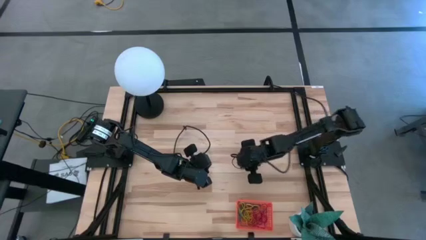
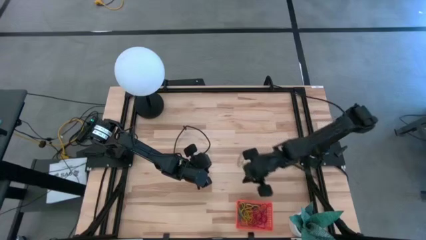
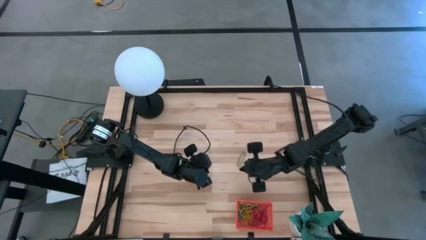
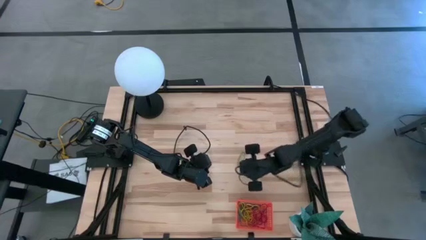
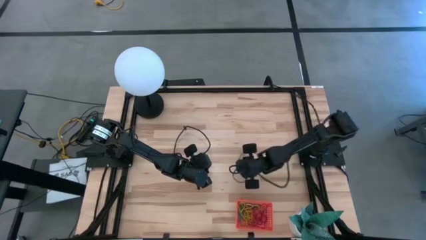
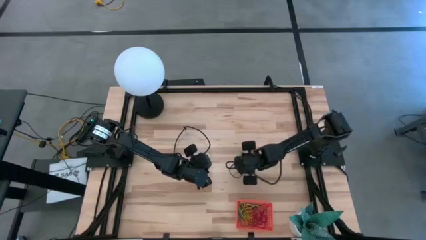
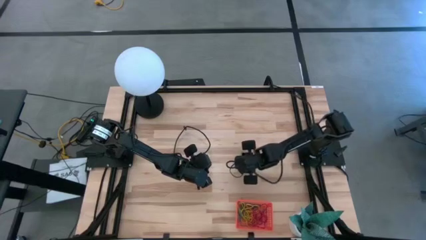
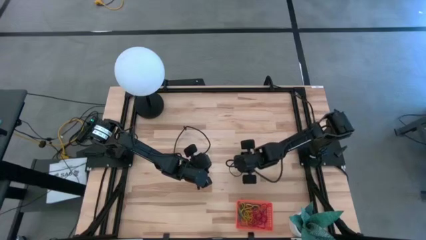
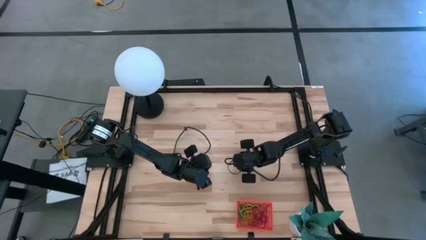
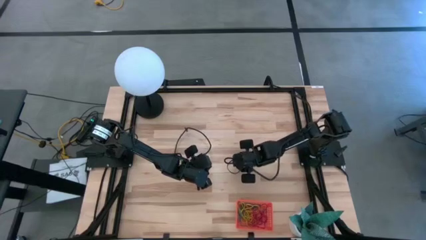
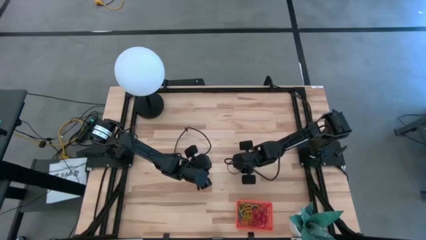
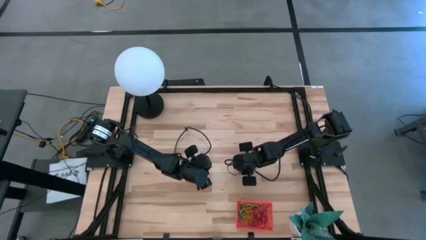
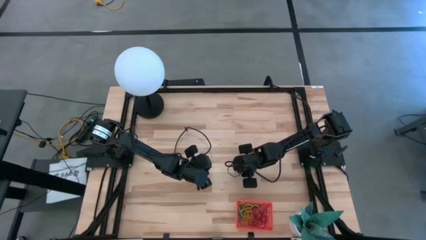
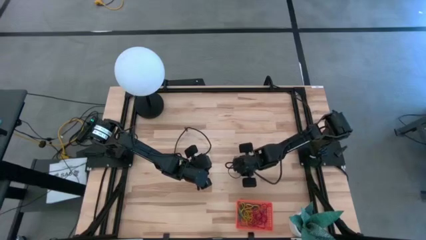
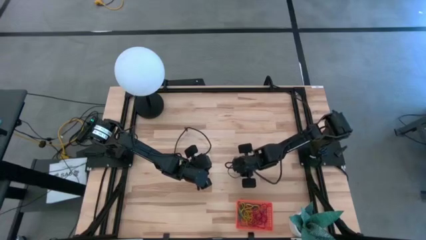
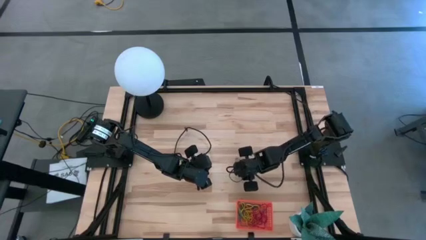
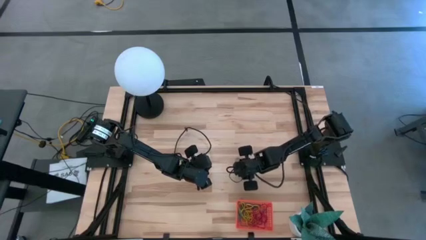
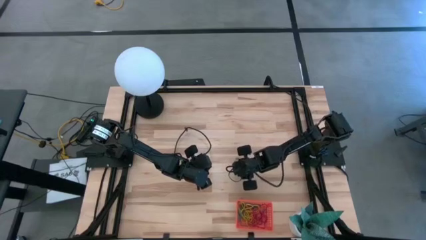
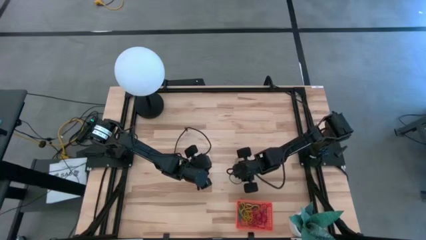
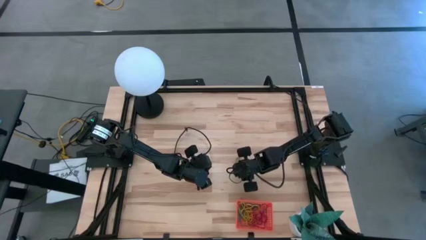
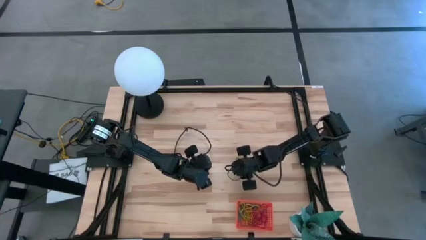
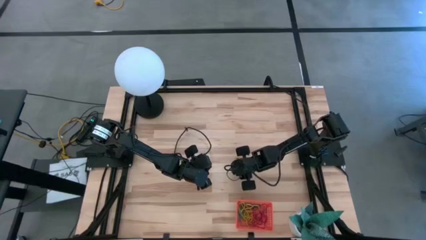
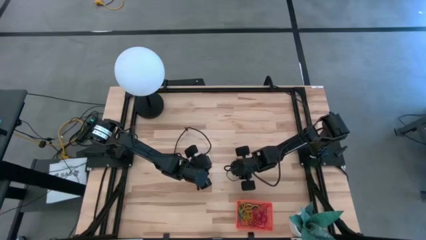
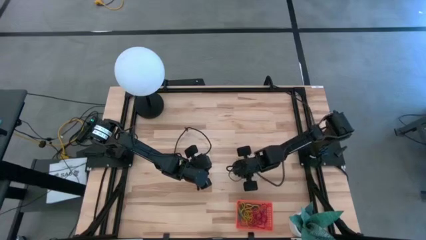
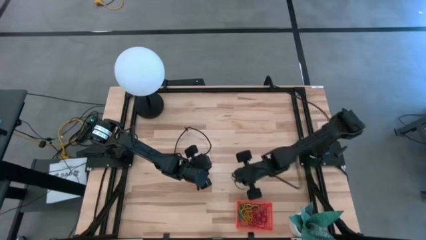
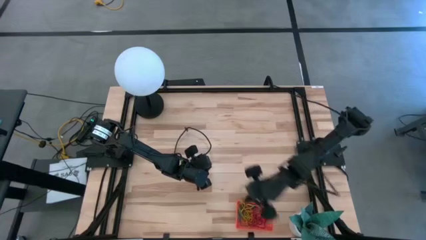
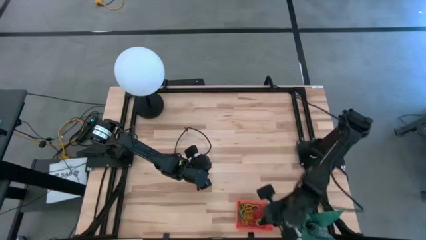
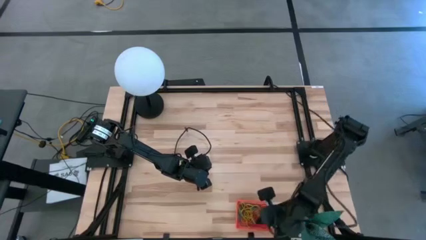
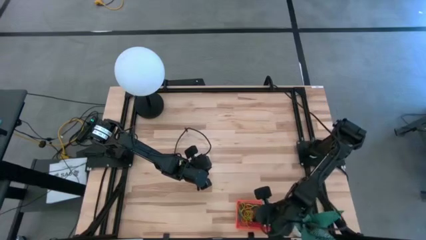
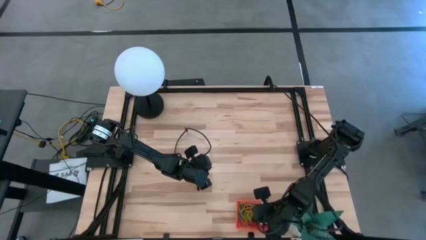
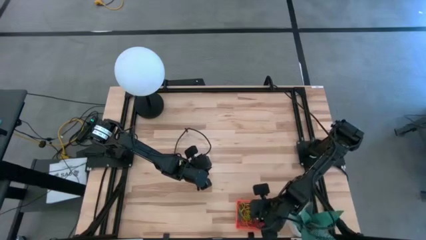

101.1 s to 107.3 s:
Task: Pick and place items into bin
Put the green rubber band into the orange bin

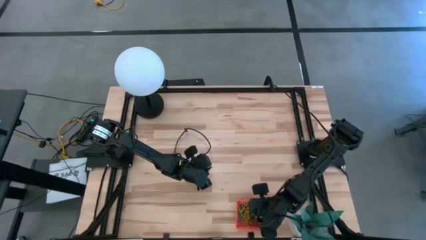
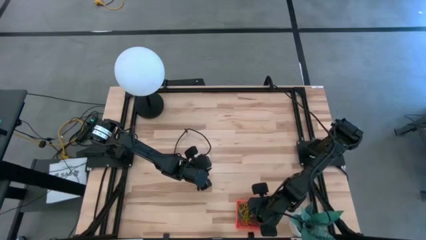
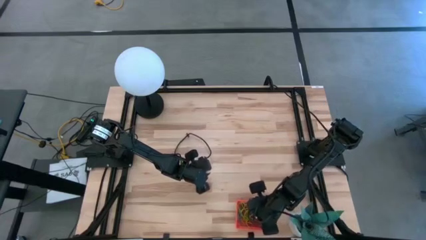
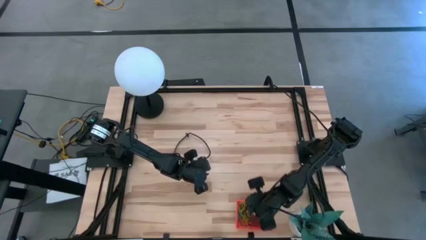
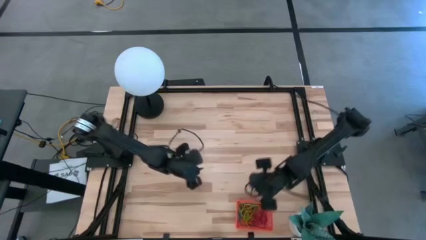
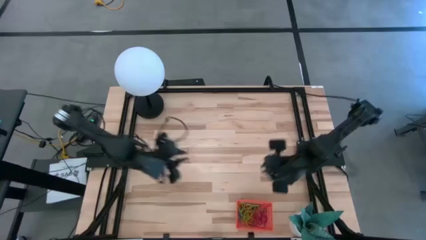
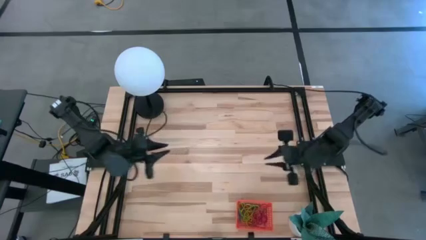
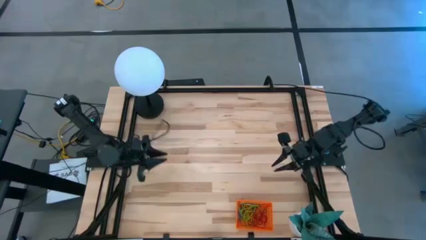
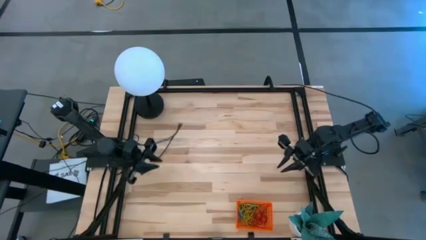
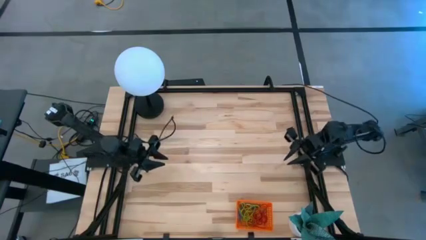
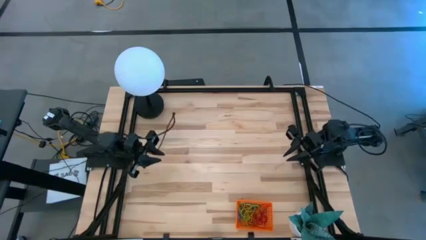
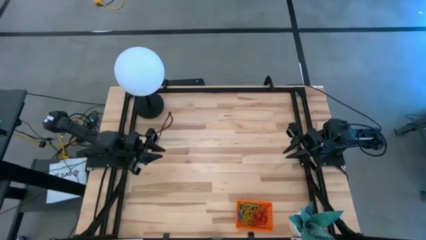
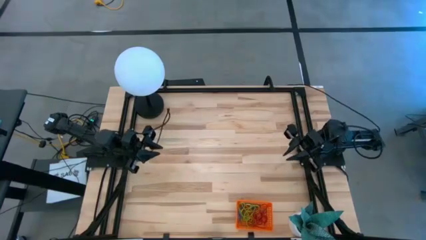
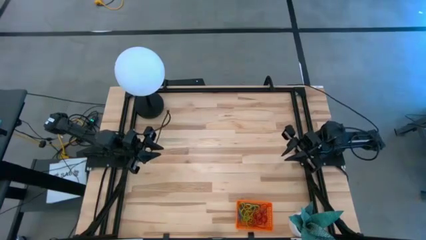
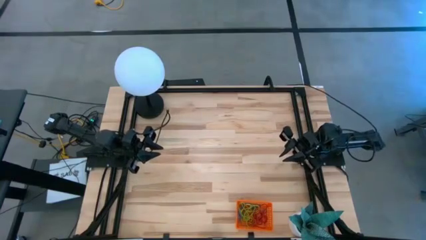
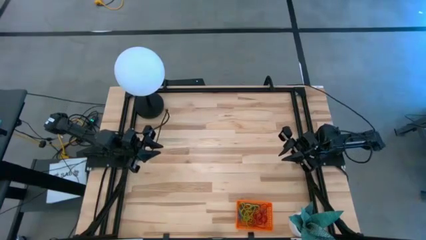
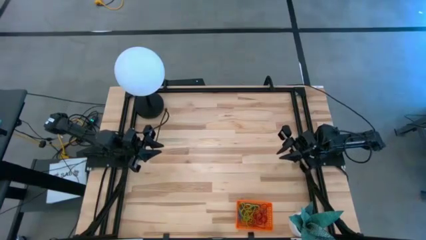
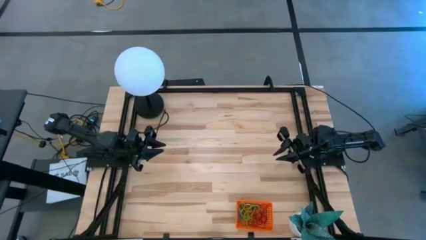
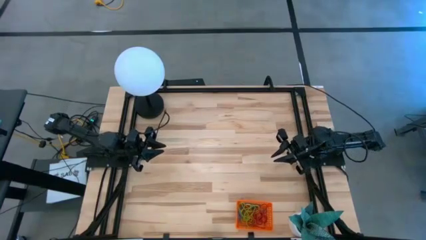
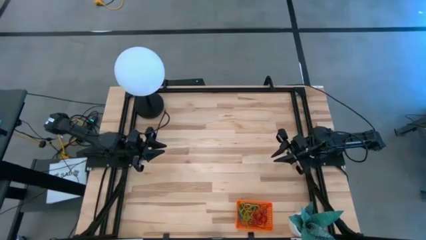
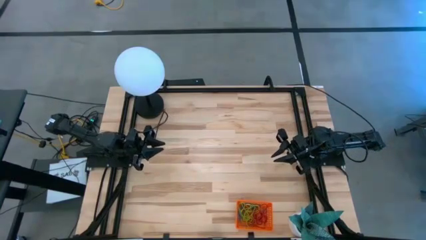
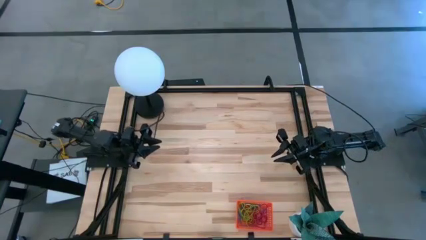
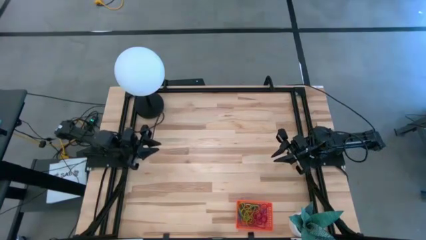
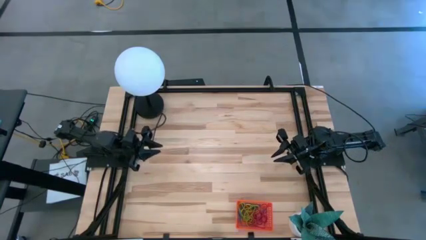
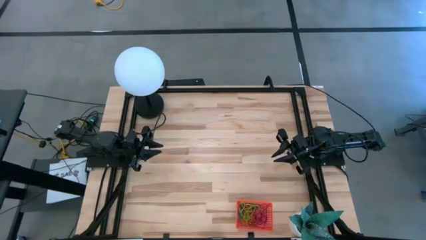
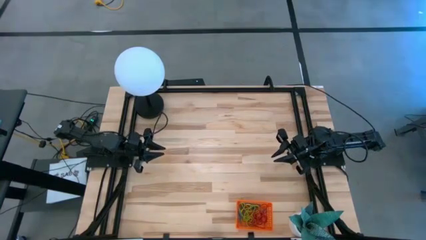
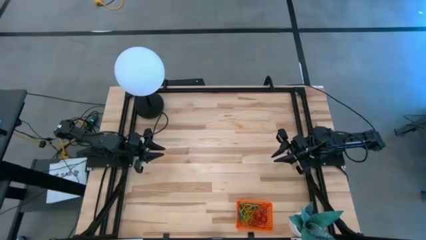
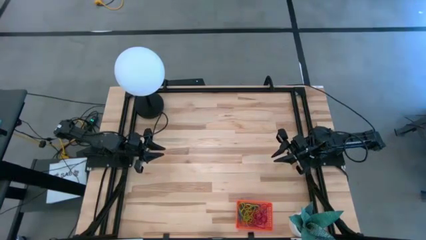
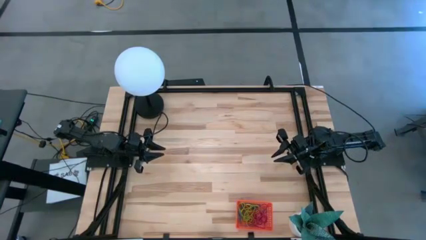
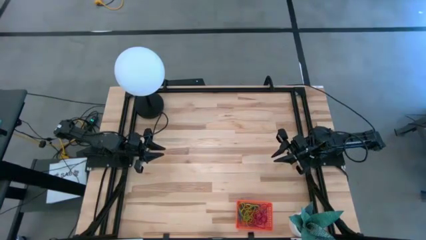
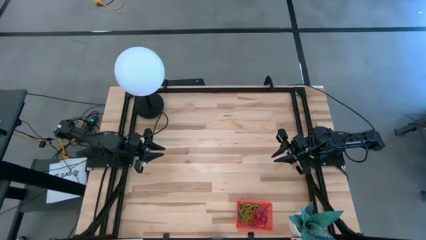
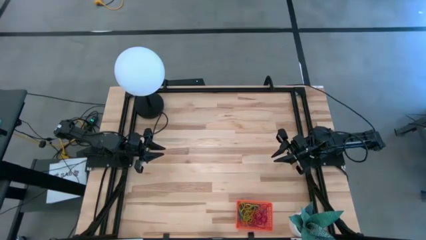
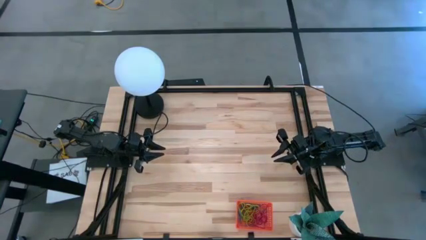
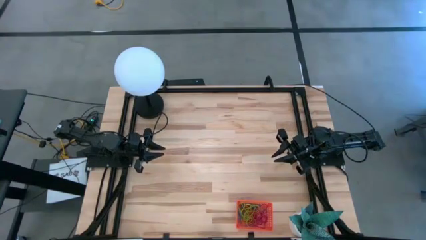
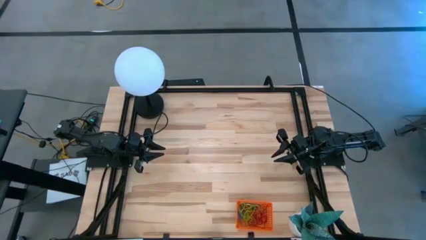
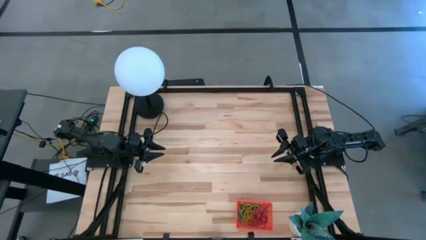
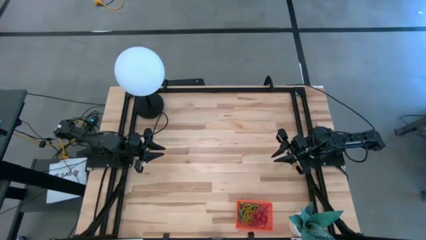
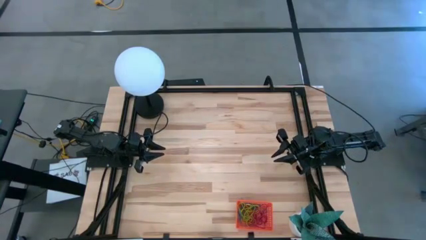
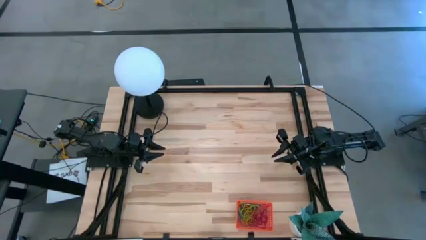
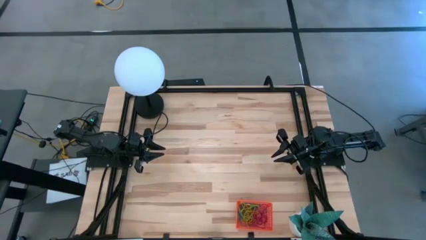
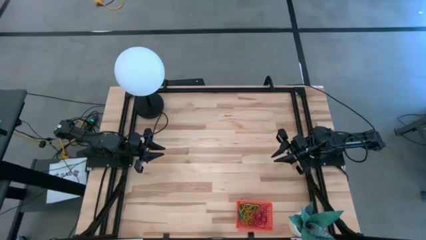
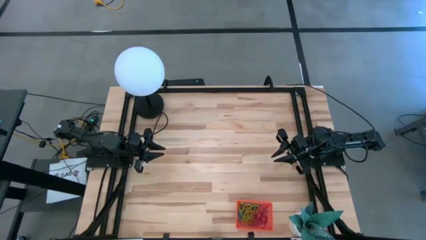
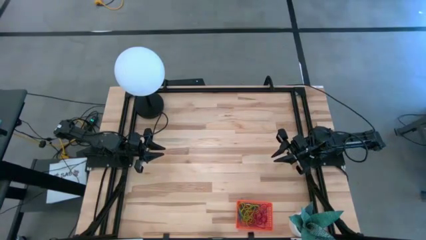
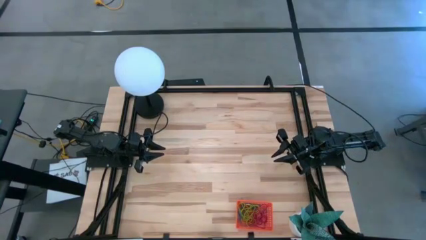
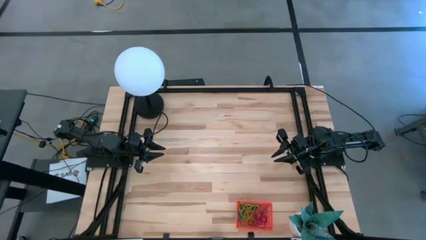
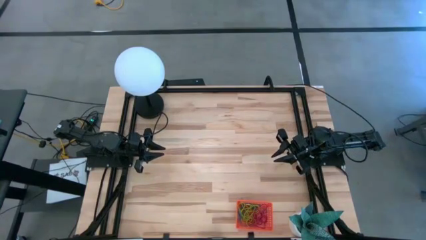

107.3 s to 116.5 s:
Return to Home Position
